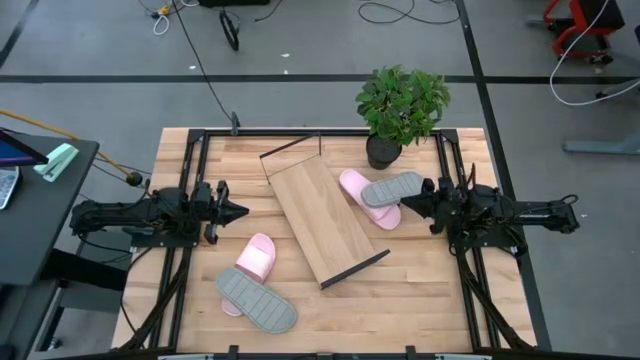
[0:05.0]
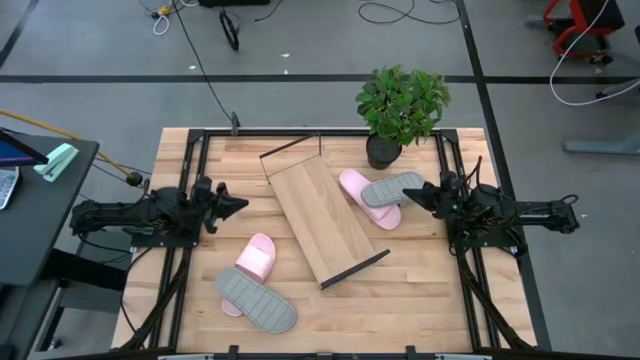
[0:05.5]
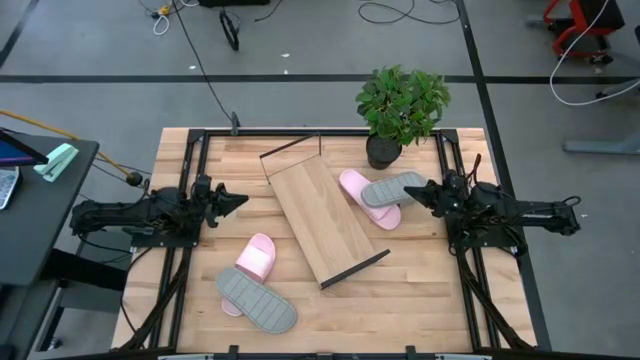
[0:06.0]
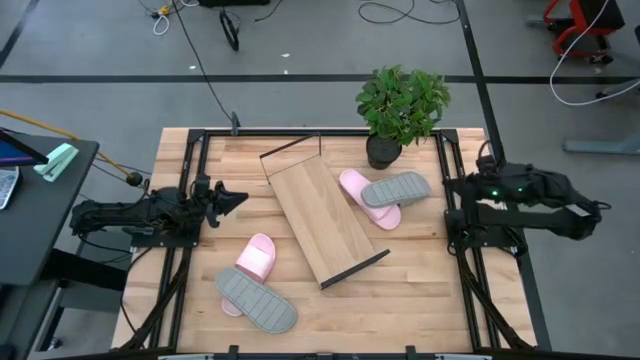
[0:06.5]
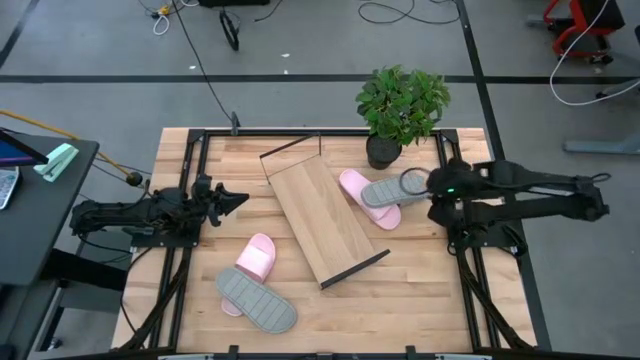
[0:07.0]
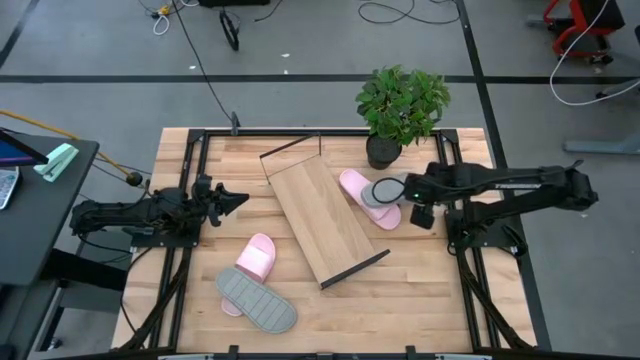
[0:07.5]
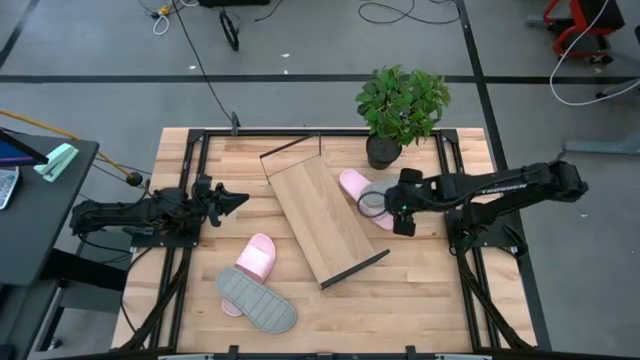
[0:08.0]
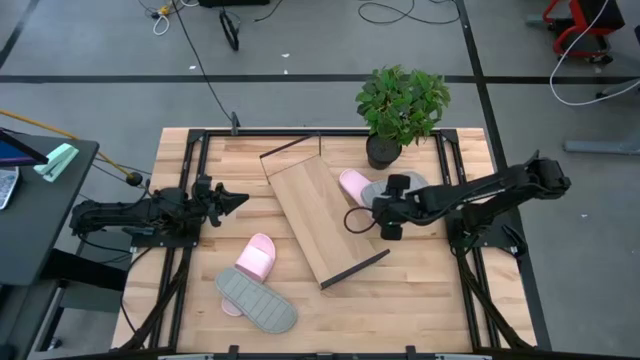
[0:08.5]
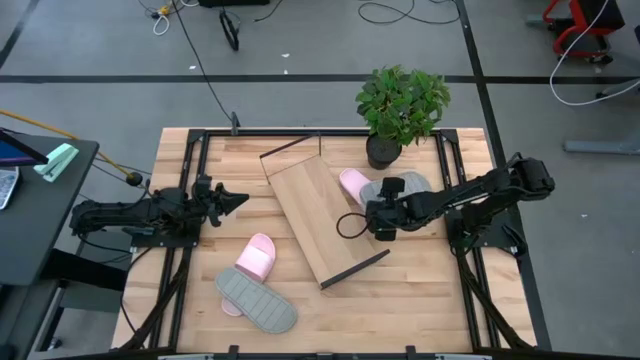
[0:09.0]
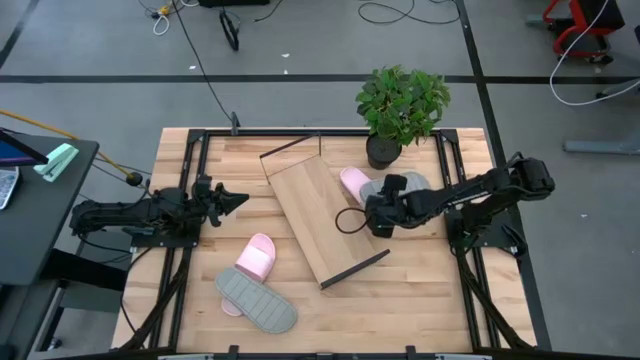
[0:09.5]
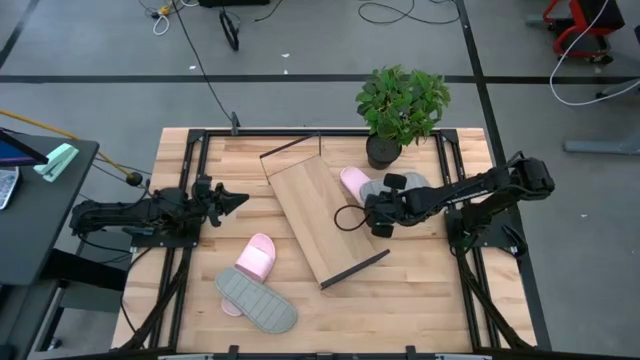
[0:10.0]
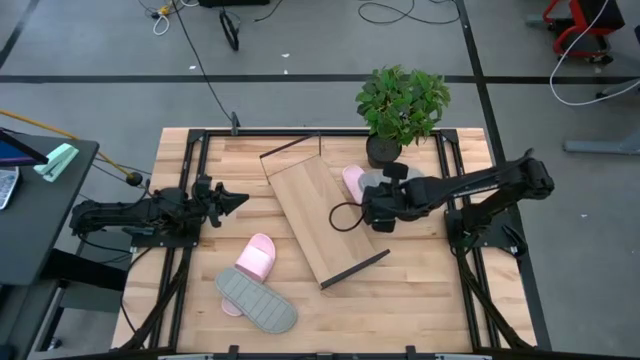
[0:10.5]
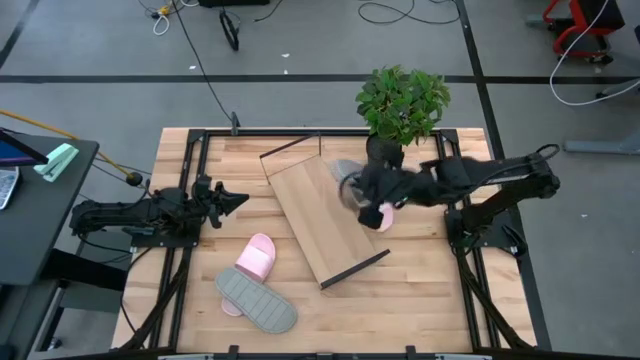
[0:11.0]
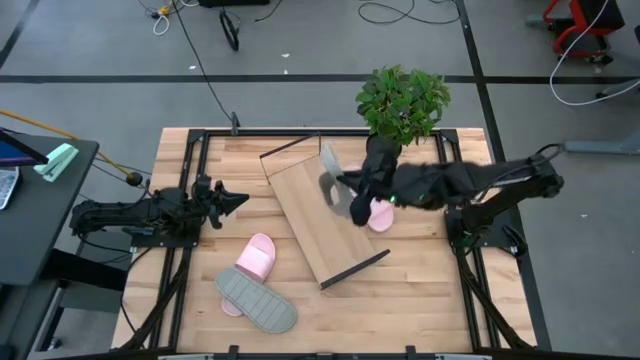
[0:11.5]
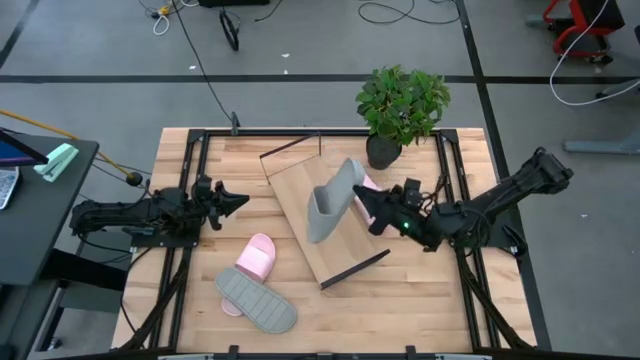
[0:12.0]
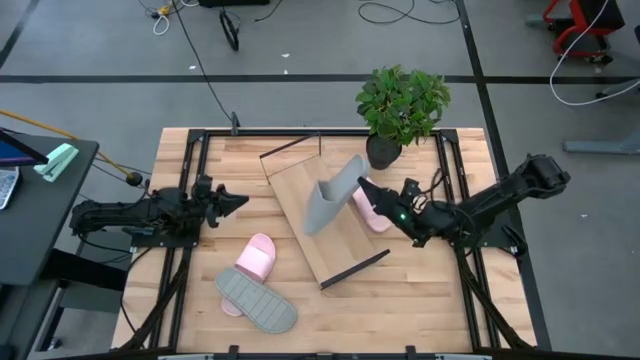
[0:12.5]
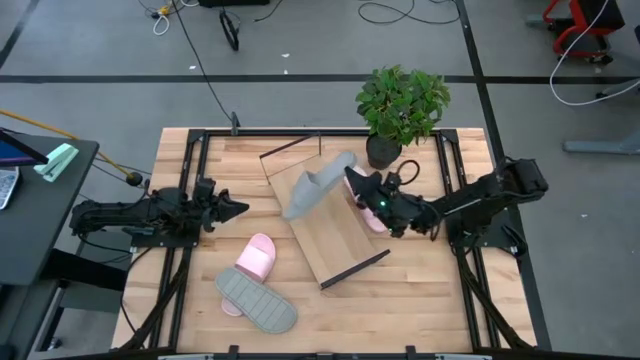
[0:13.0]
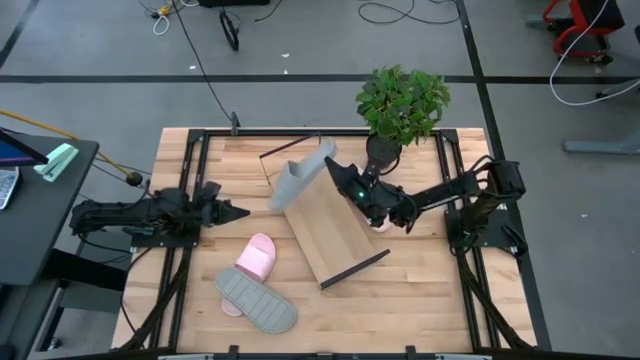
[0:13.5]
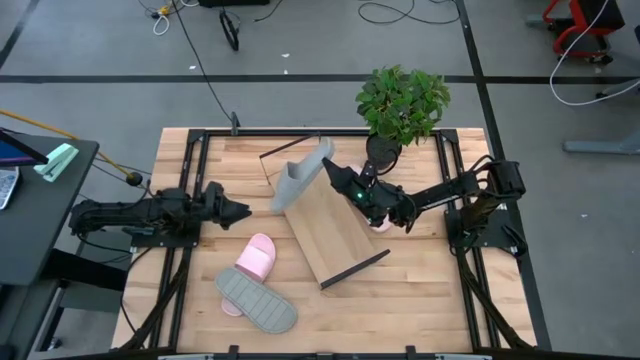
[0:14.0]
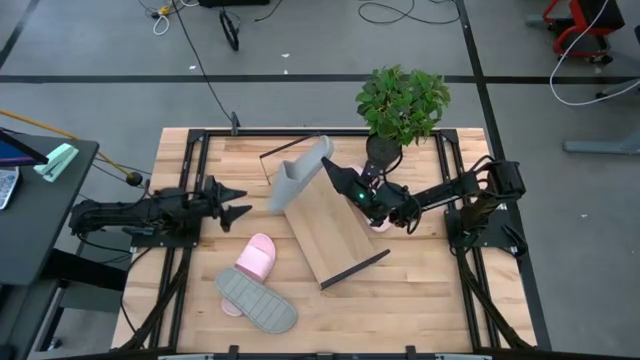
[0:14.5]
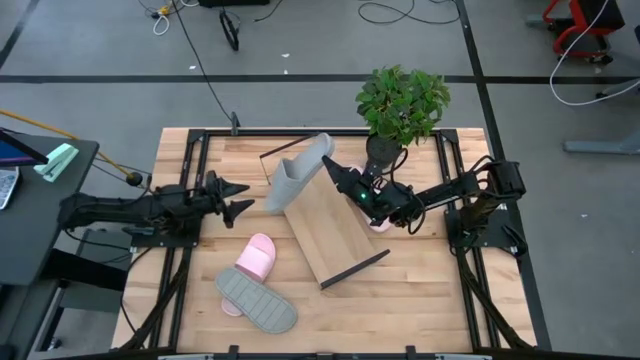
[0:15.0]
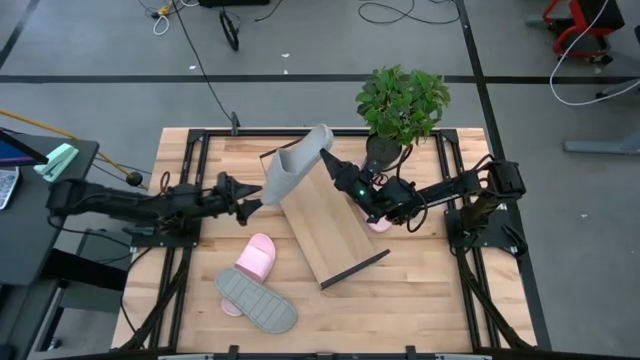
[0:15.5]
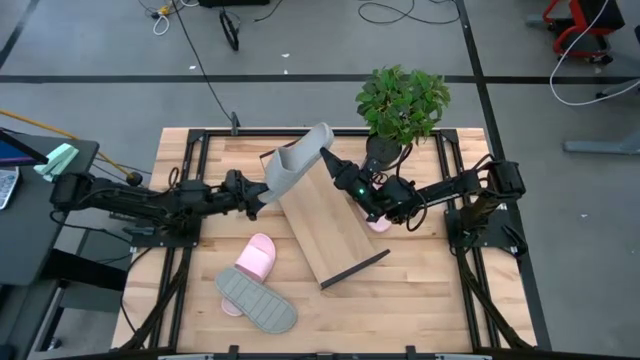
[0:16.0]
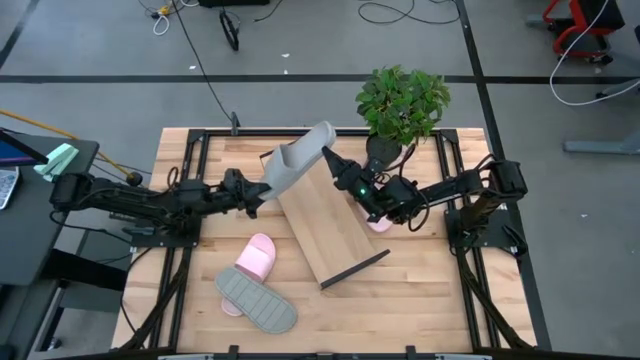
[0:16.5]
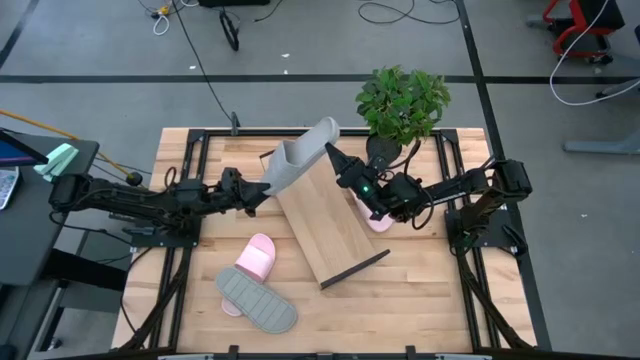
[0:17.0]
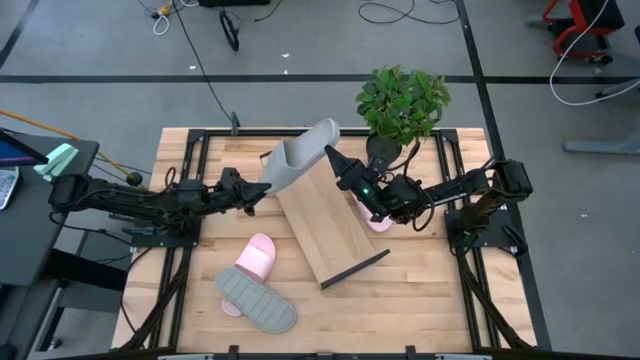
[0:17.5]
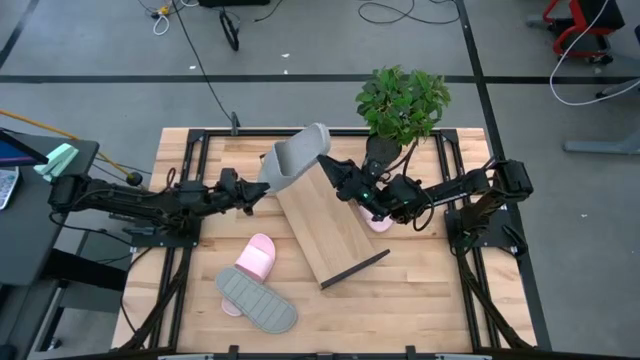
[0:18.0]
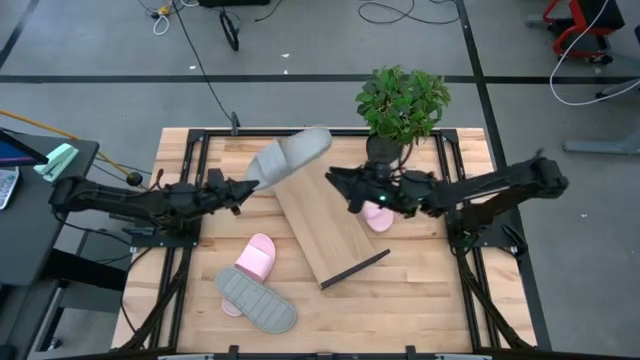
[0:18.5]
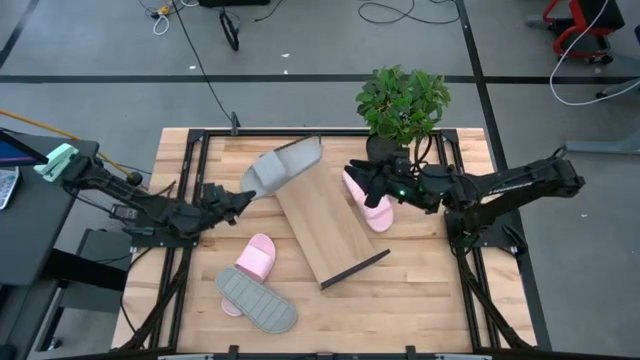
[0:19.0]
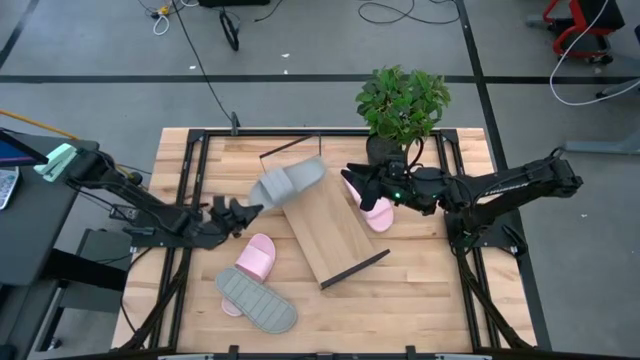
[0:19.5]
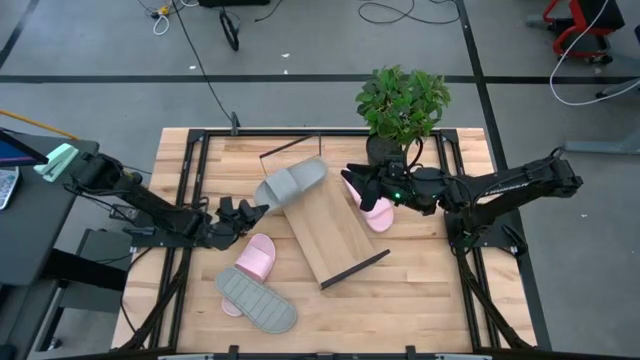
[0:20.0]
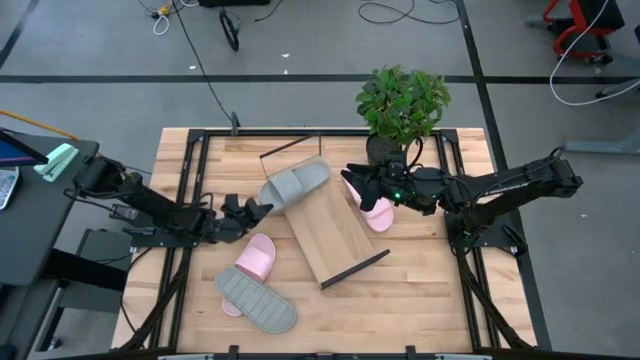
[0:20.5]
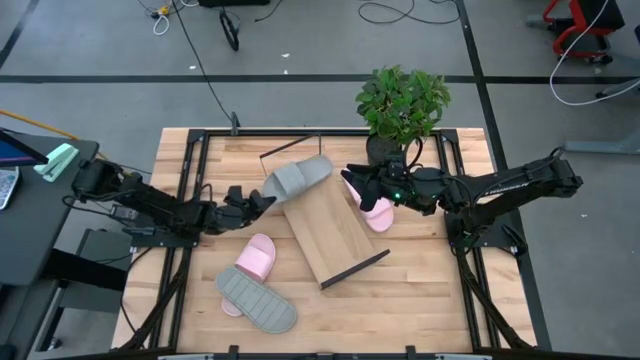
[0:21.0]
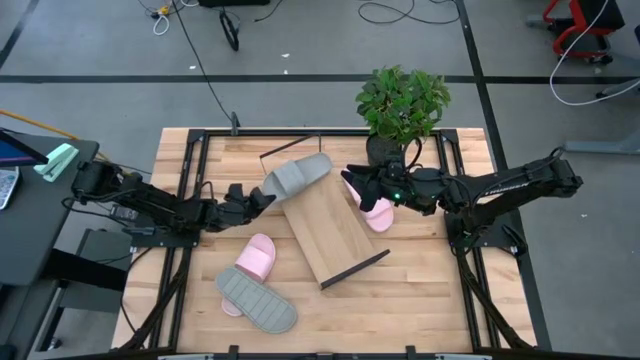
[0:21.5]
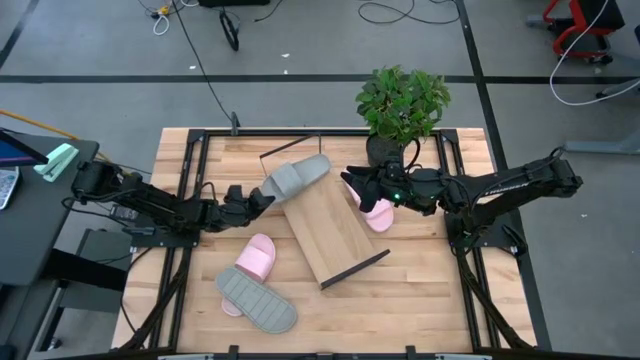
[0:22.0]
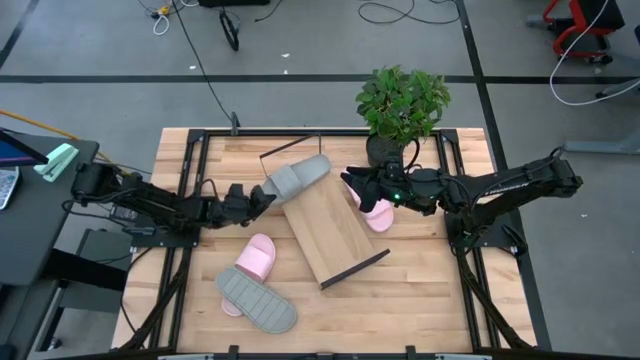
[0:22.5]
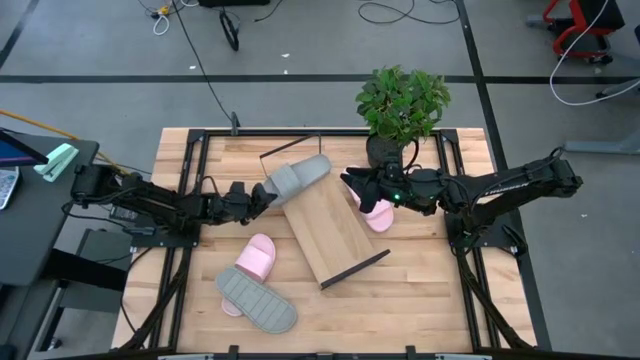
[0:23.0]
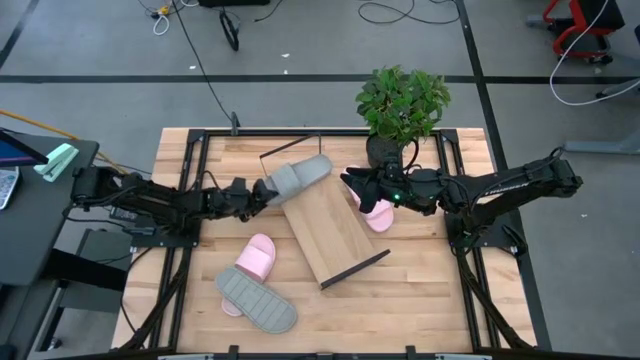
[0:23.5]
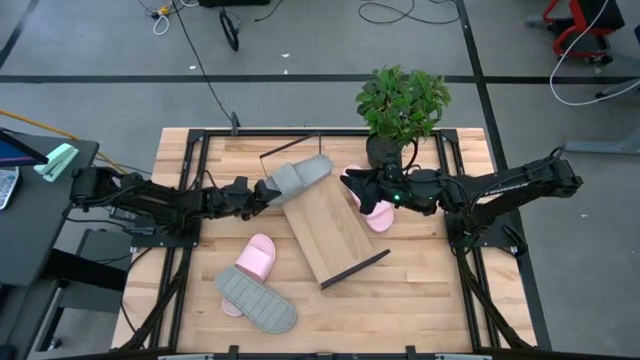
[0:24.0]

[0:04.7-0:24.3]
Task: Pick and place slides into the shelf
Put the top gray slides on the shelf

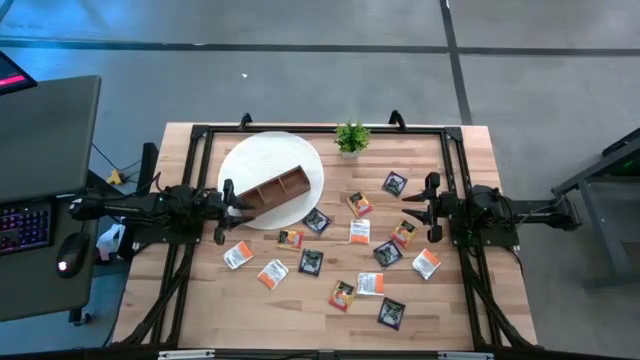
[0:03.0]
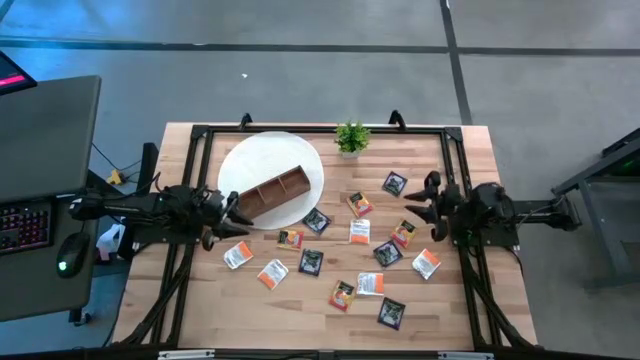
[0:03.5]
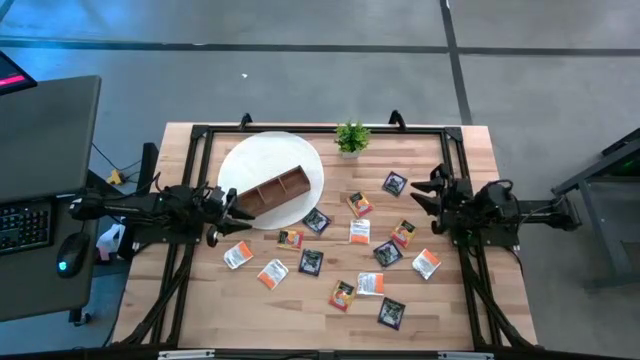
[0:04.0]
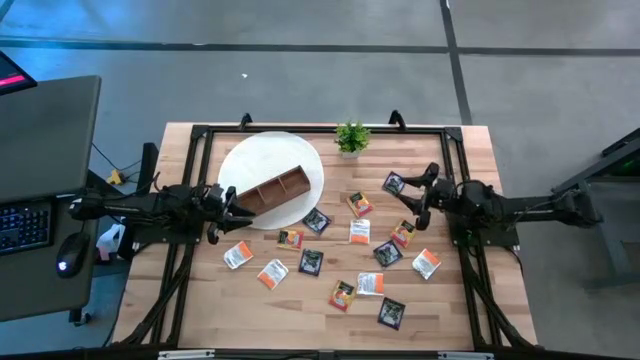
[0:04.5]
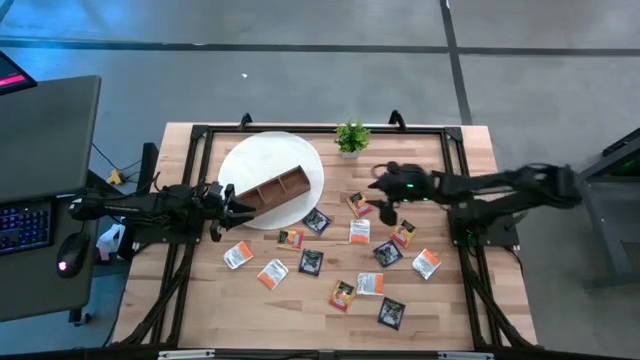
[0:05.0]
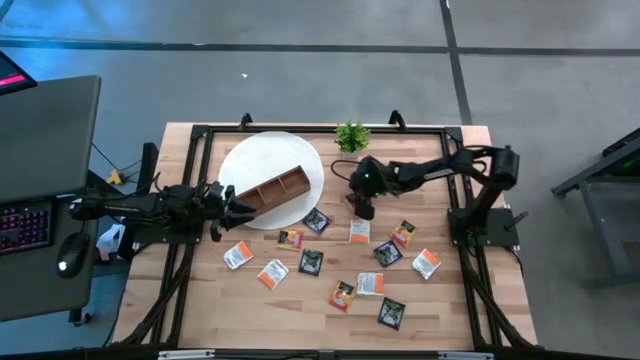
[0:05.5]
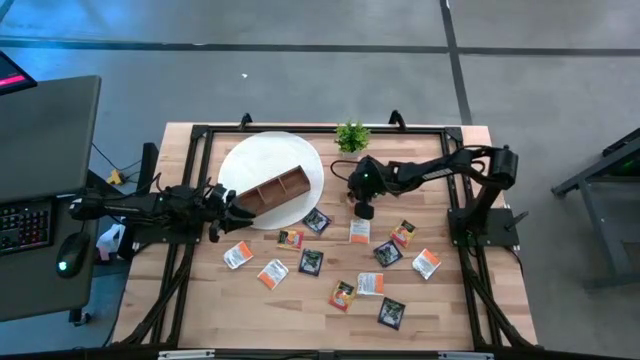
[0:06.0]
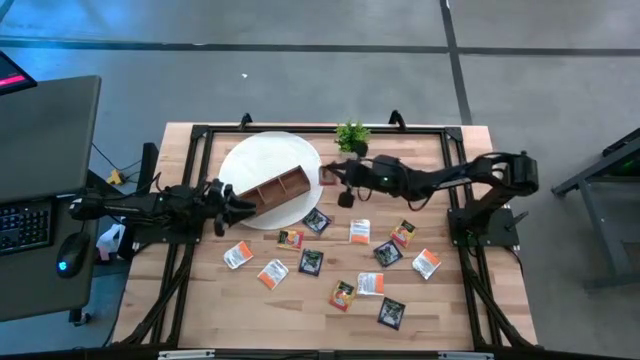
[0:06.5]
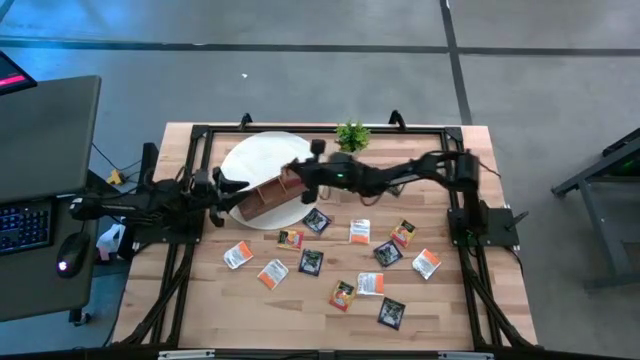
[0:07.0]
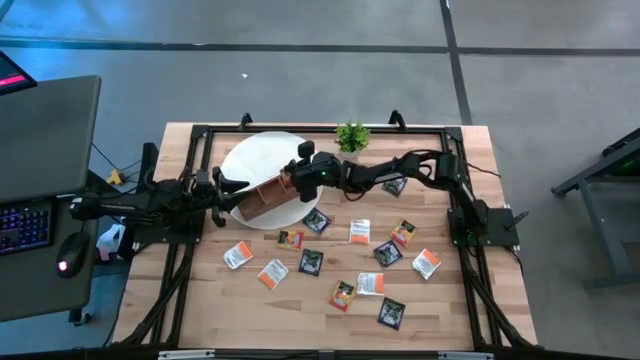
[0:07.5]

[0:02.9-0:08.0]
Task: Pick & Place Tea
Put the orange tea bag into the right section of the wooden organizer
